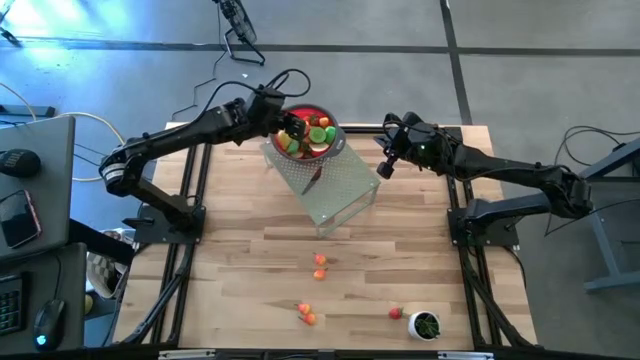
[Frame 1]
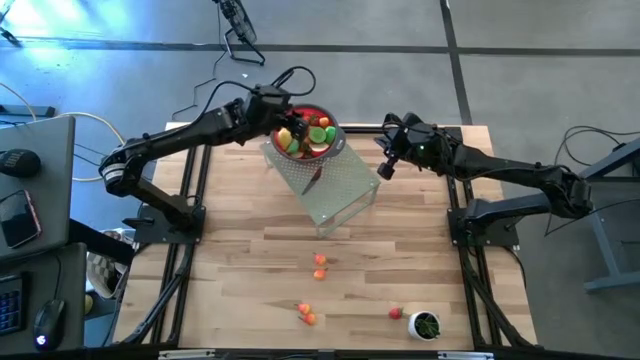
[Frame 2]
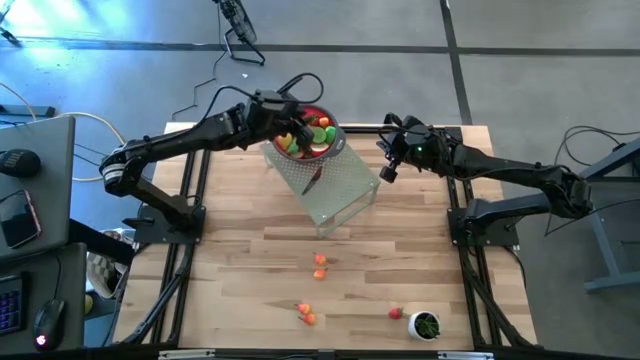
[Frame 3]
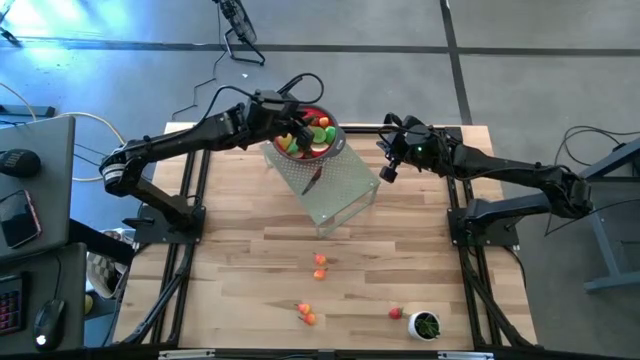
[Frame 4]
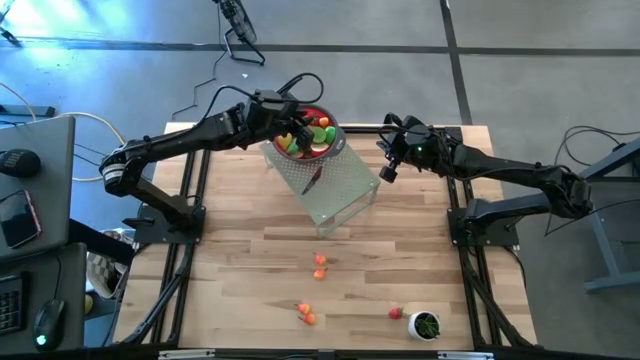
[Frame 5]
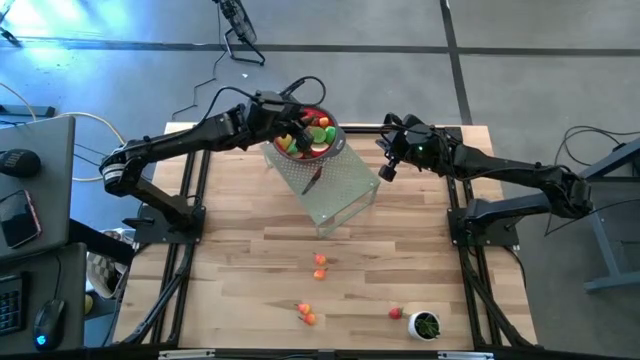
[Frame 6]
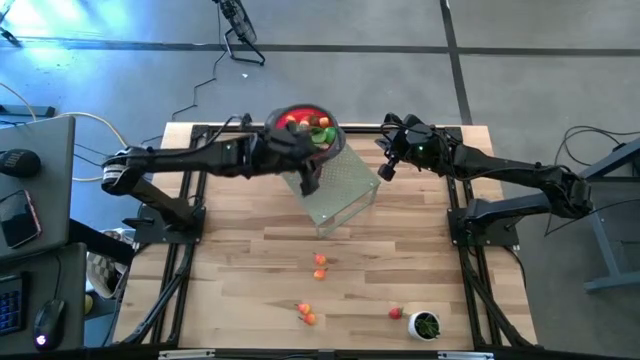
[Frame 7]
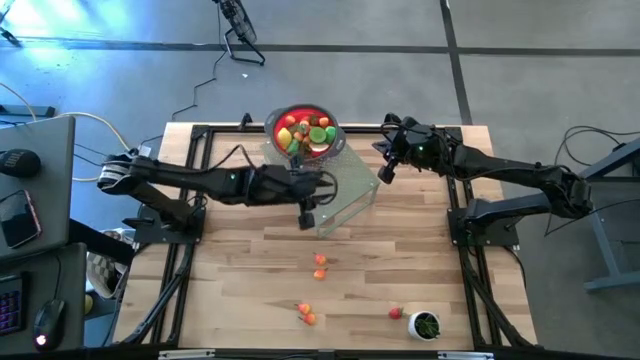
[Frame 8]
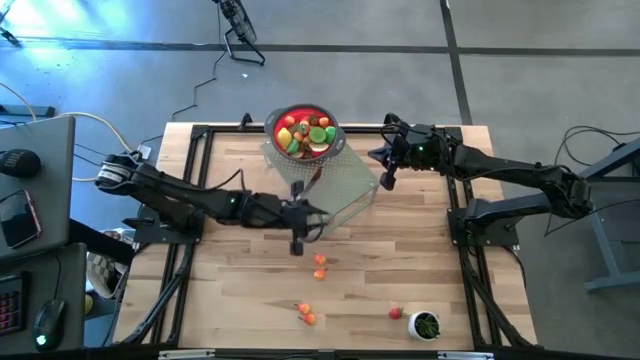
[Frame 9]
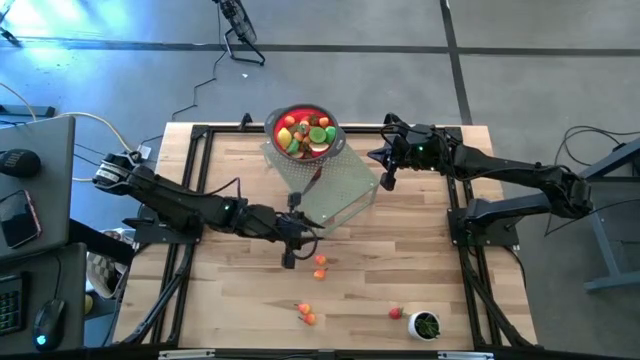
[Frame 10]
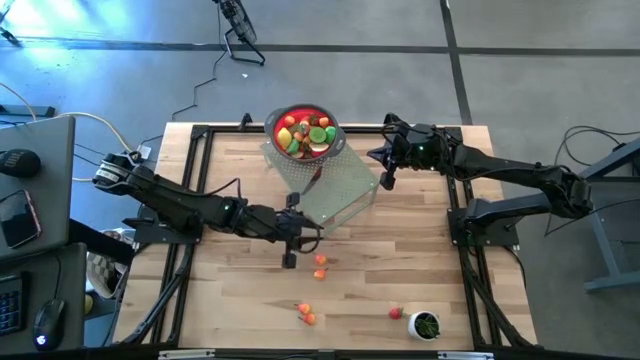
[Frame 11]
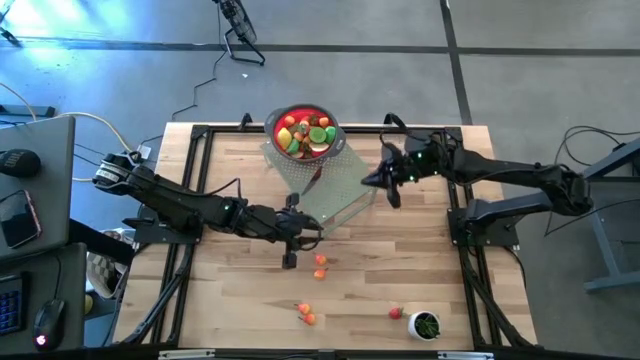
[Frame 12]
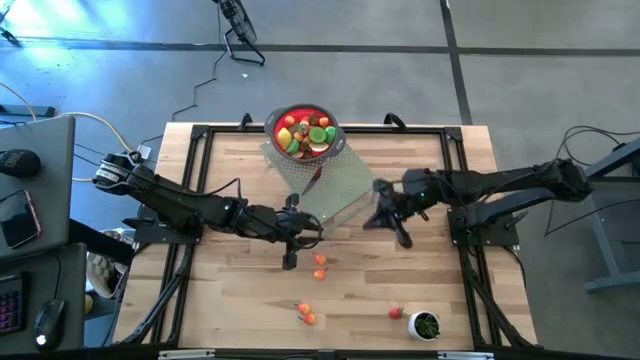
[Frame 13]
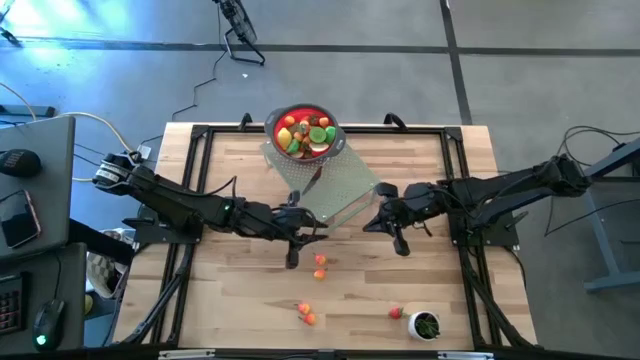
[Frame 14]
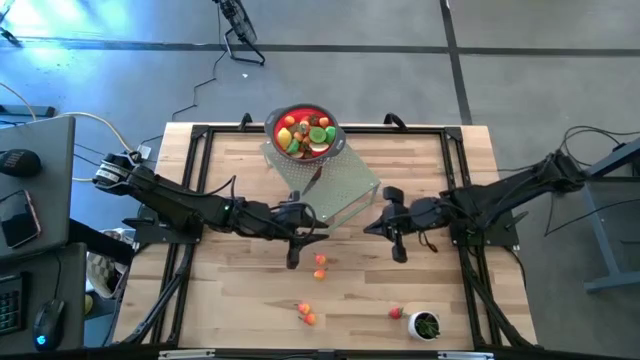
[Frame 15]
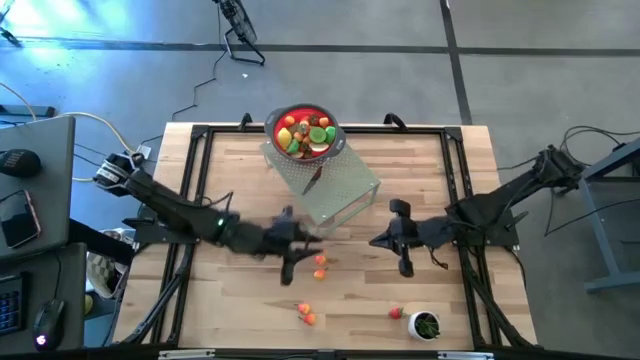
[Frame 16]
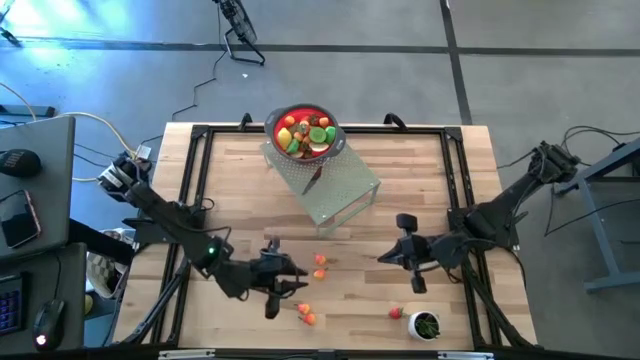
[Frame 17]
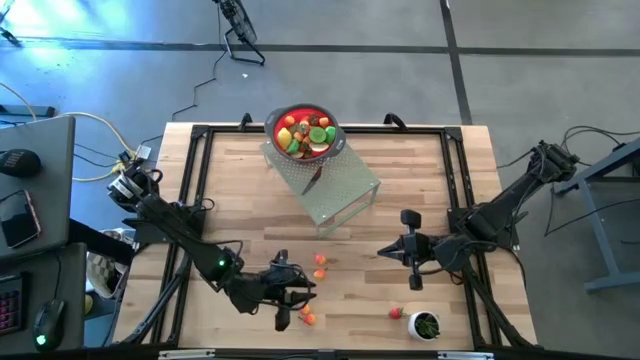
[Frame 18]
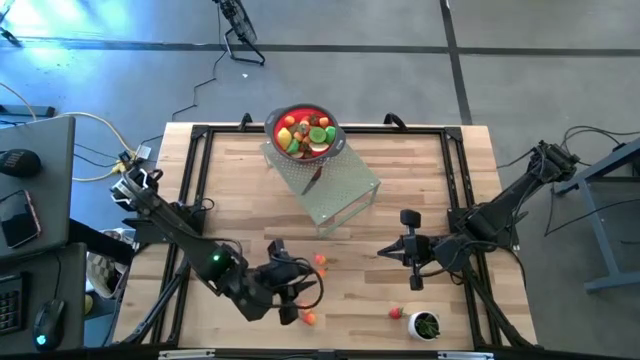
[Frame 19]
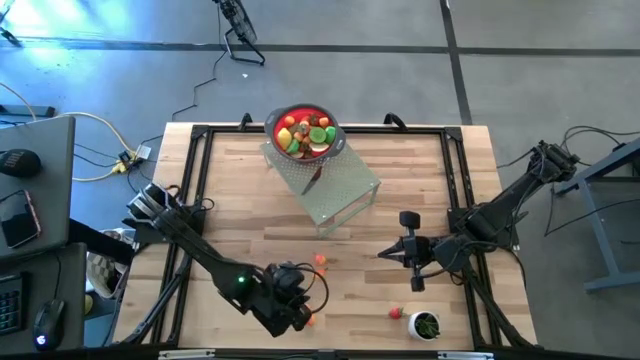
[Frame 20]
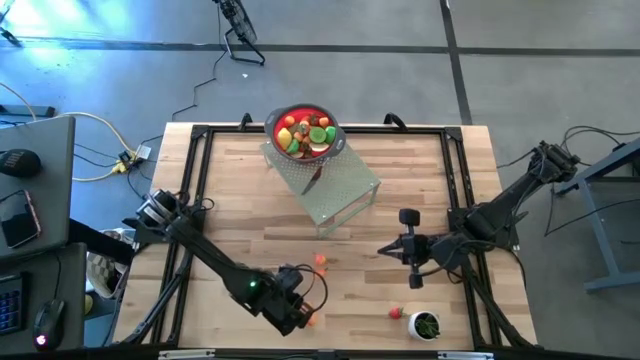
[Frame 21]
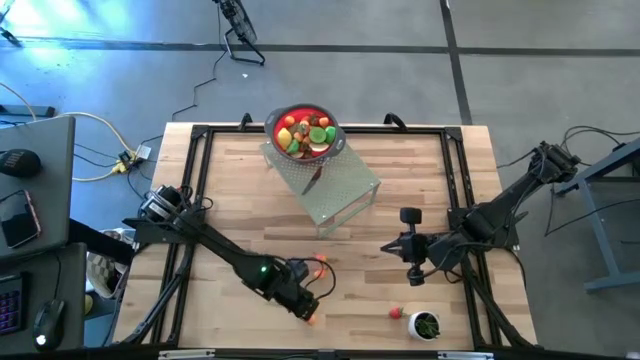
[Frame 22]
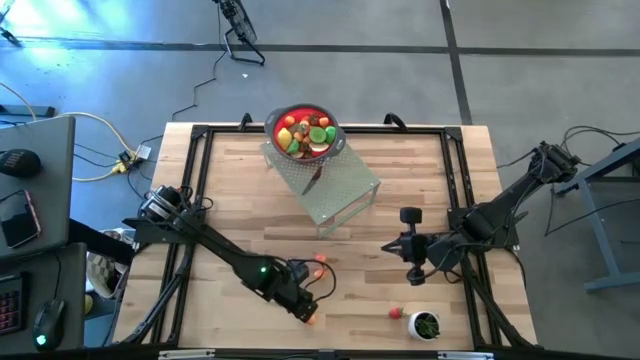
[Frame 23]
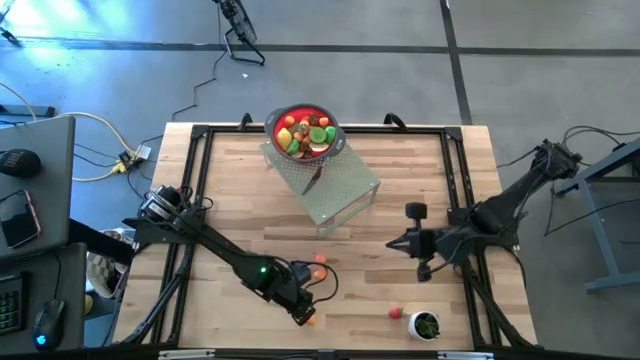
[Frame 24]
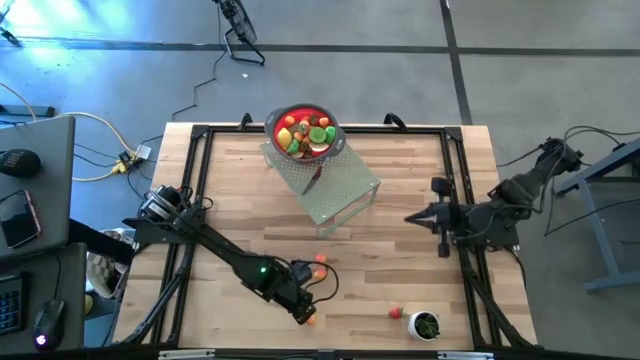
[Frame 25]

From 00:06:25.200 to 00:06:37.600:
Task: Pick & Place Fruit
Put the orange pear into the red strainer on the shelf

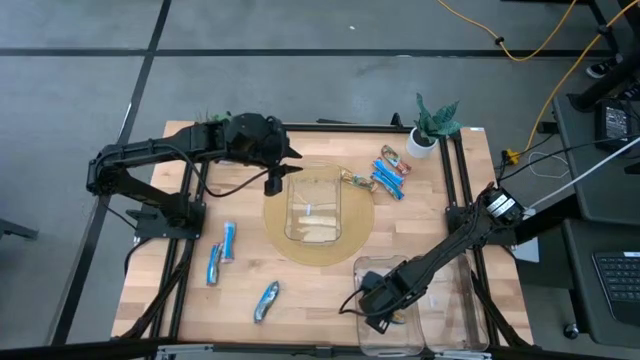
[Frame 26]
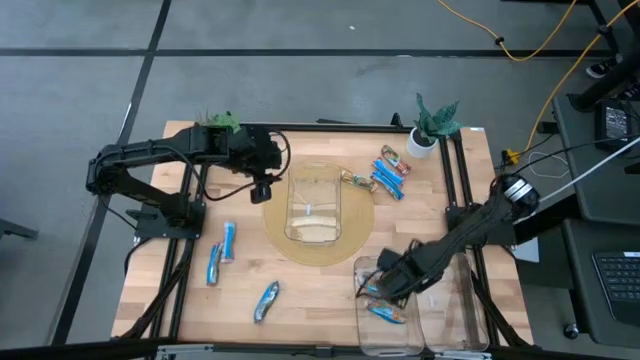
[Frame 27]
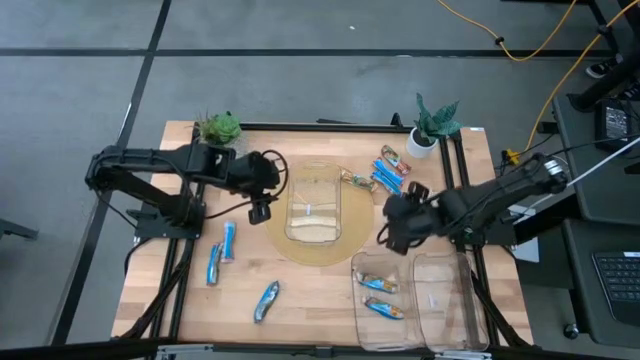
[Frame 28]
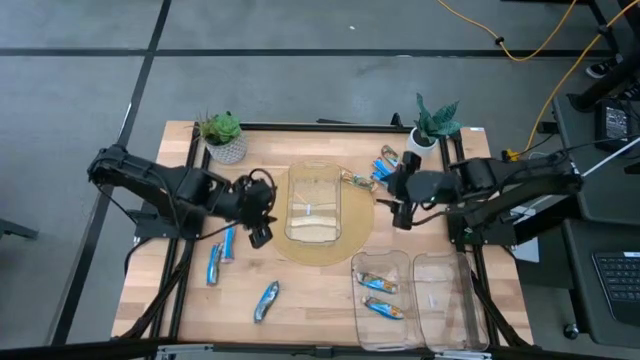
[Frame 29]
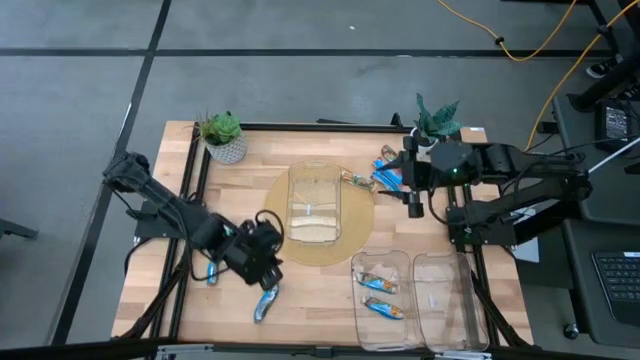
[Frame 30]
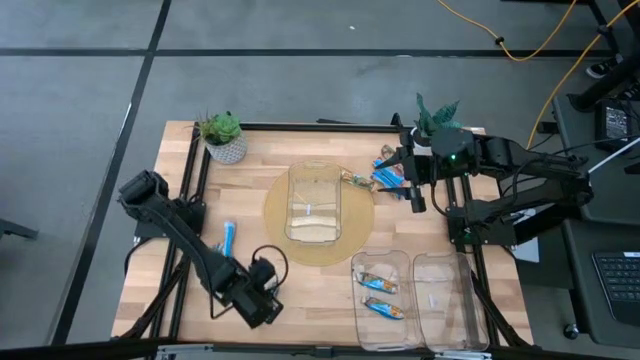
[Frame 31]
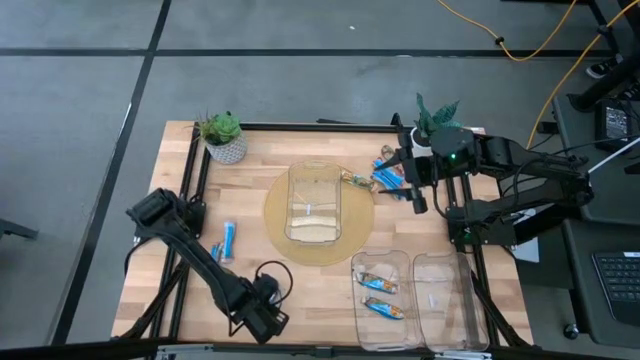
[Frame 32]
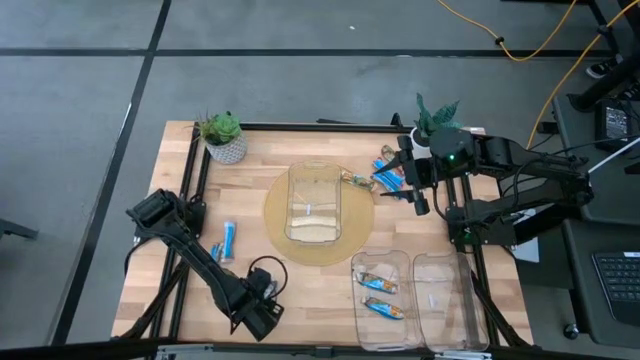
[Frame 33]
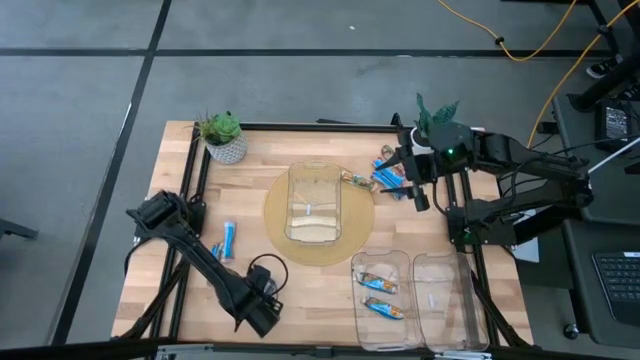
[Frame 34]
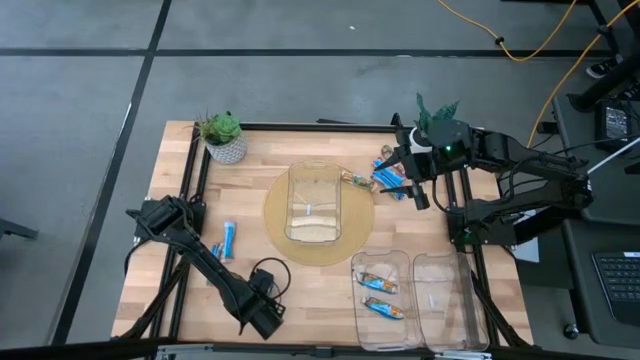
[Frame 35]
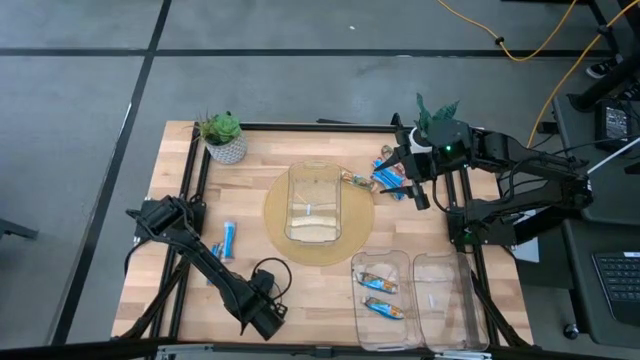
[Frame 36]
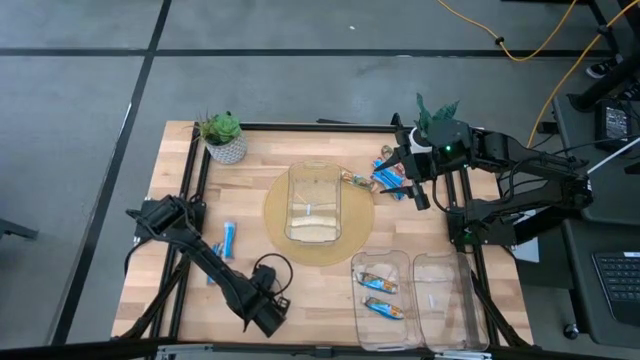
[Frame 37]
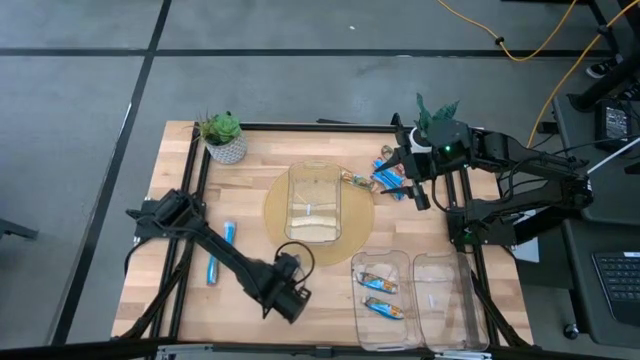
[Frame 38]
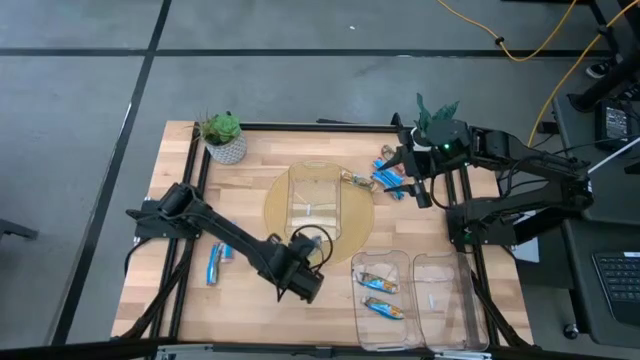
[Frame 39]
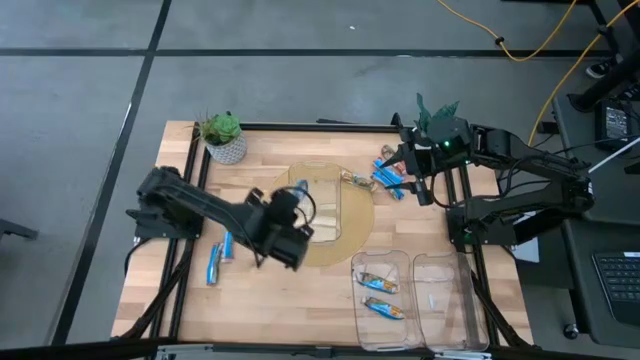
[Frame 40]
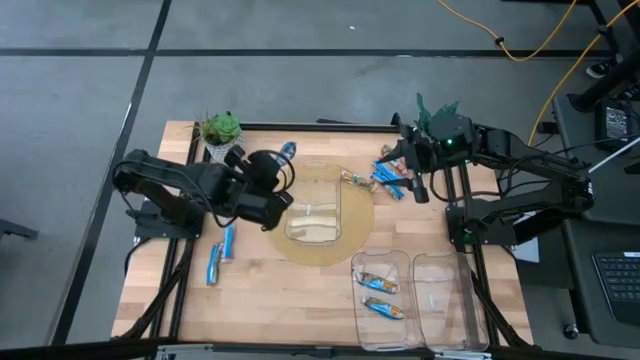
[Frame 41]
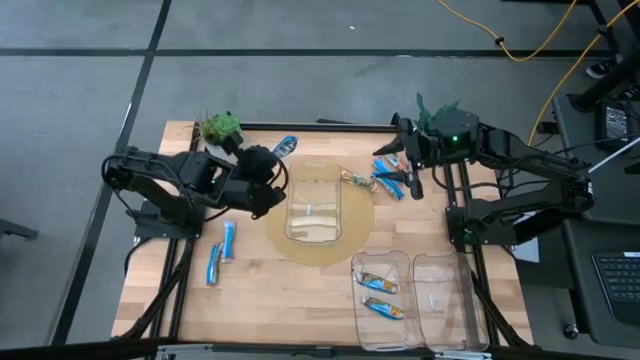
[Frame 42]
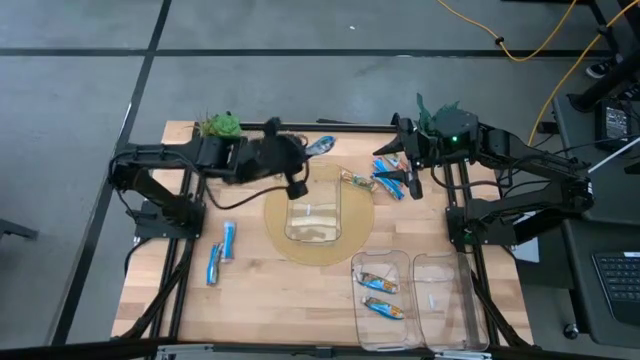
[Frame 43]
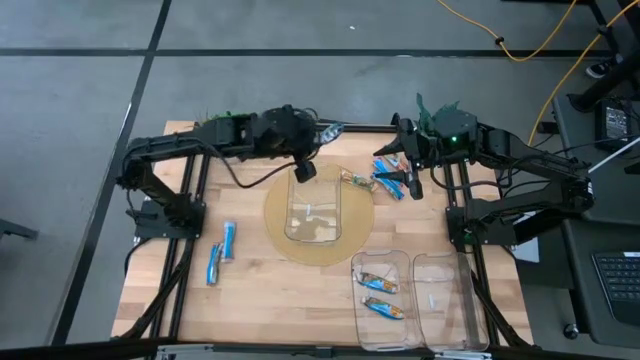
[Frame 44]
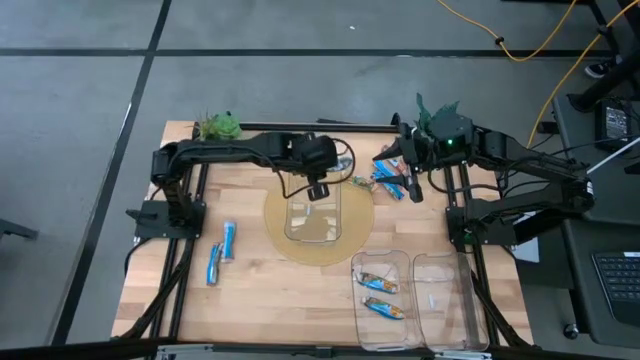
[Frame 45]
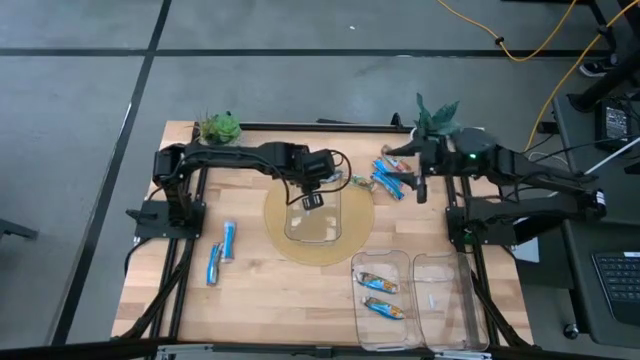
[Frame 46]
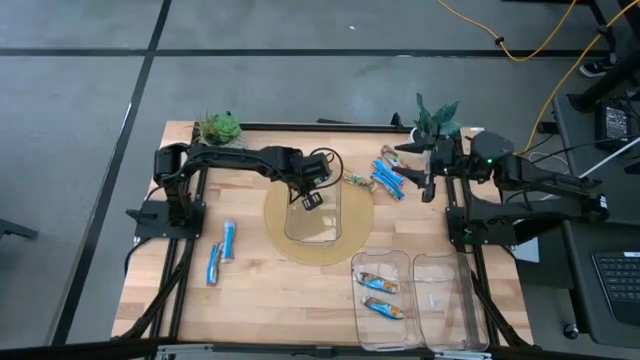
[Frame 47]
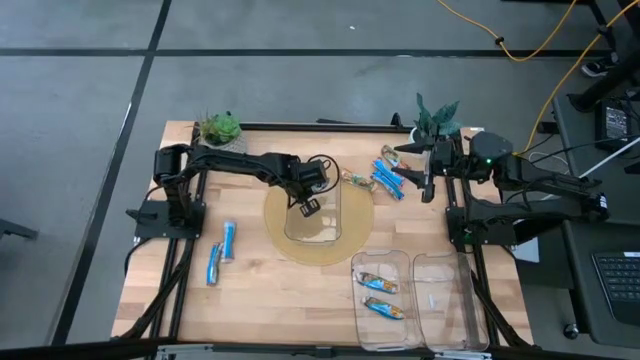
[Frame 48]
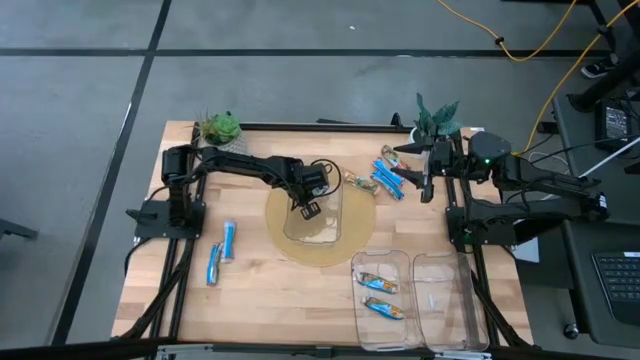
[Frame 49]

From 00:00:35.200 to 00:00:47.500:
Task: Pick and place Granola Bars by type
Put the blue granola bar pack into the top transparent bin
